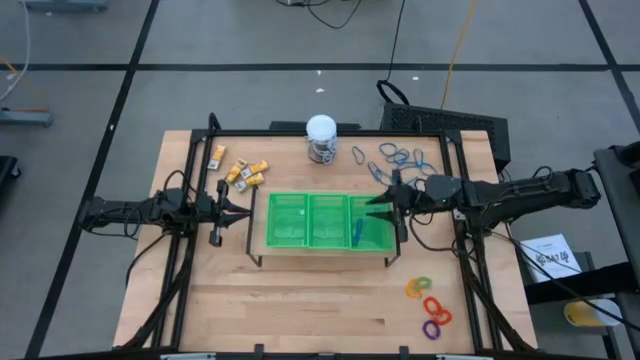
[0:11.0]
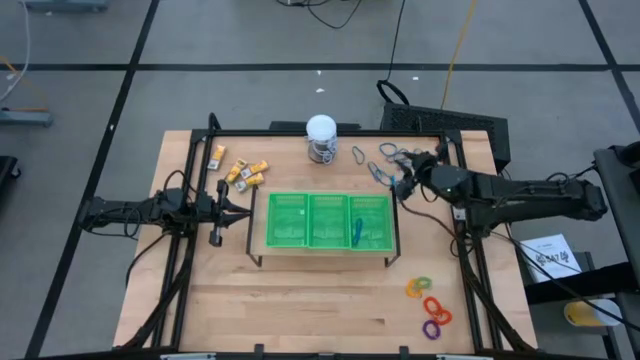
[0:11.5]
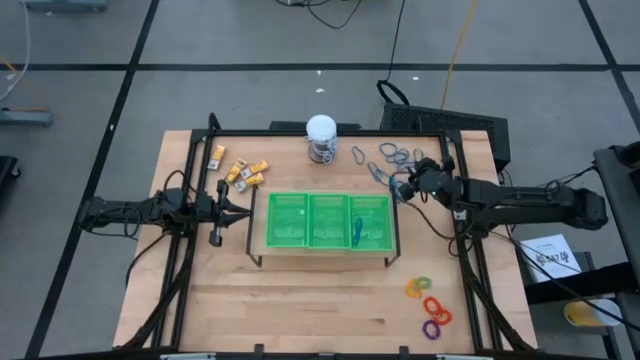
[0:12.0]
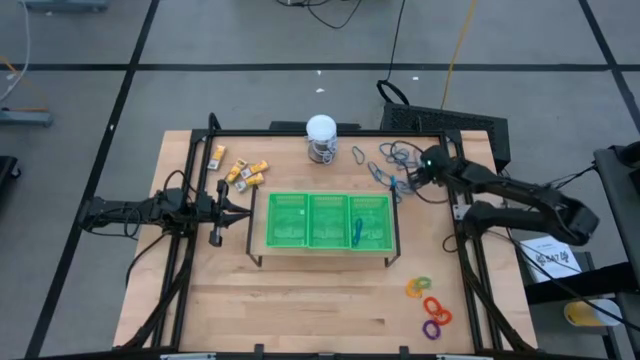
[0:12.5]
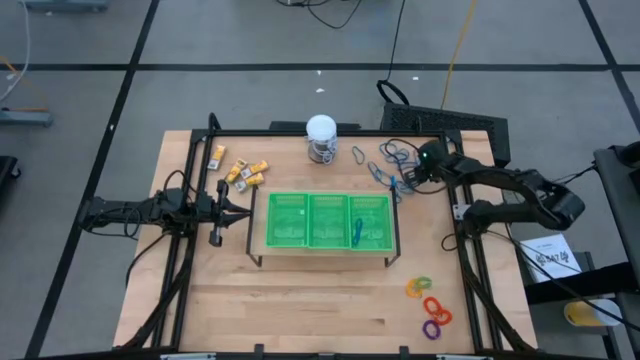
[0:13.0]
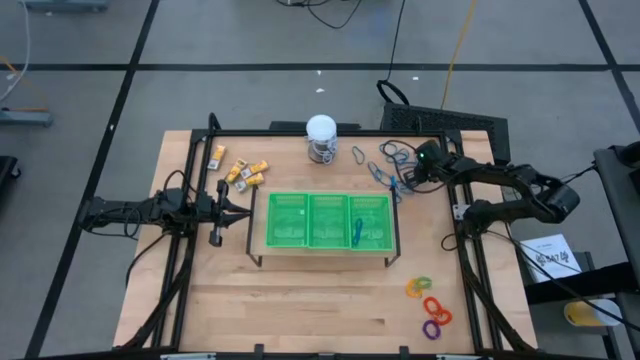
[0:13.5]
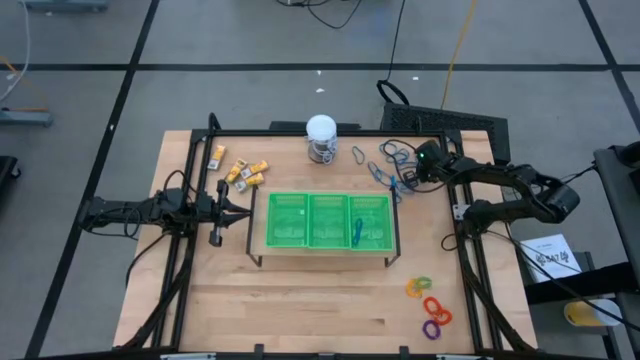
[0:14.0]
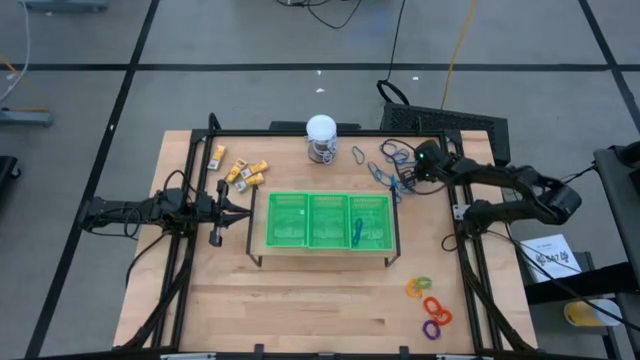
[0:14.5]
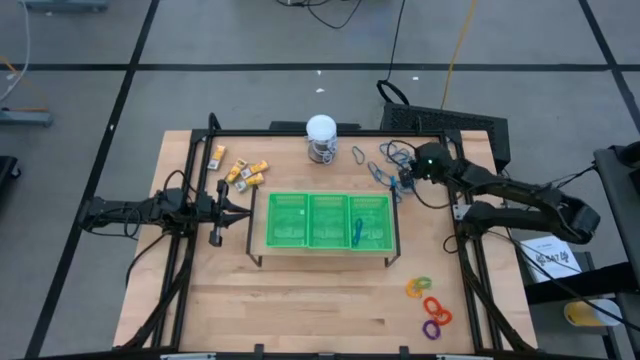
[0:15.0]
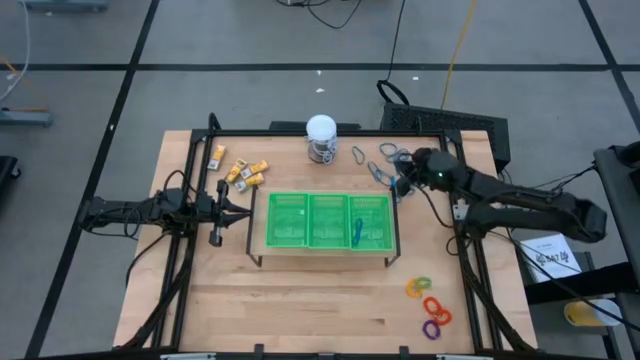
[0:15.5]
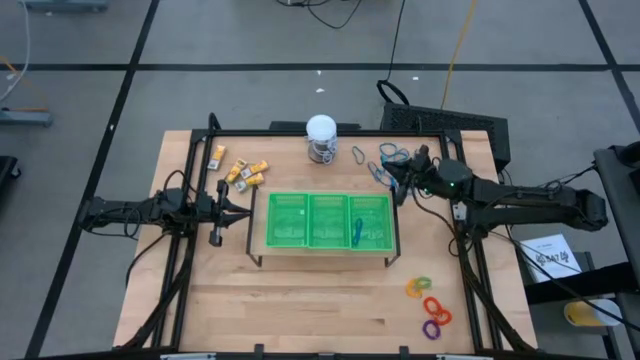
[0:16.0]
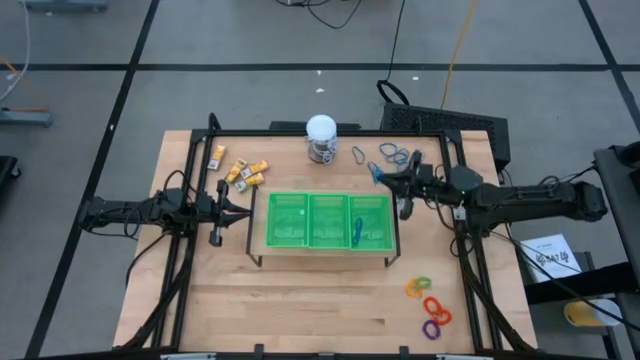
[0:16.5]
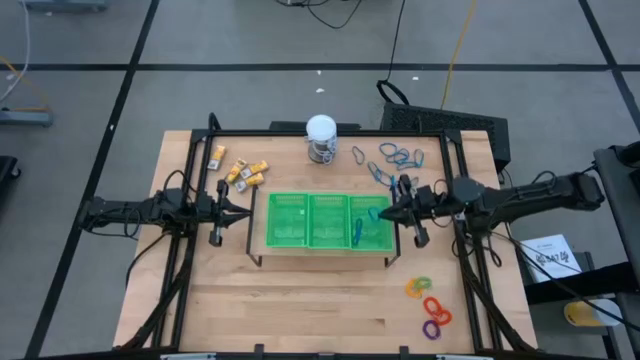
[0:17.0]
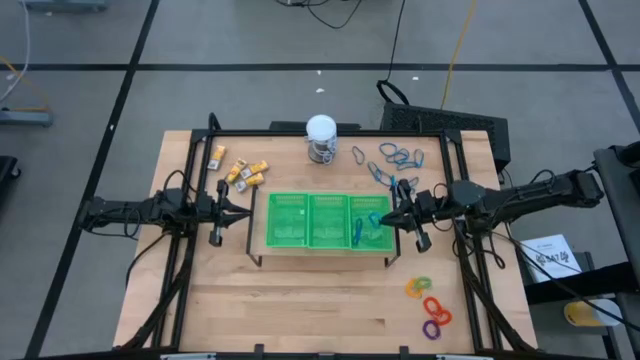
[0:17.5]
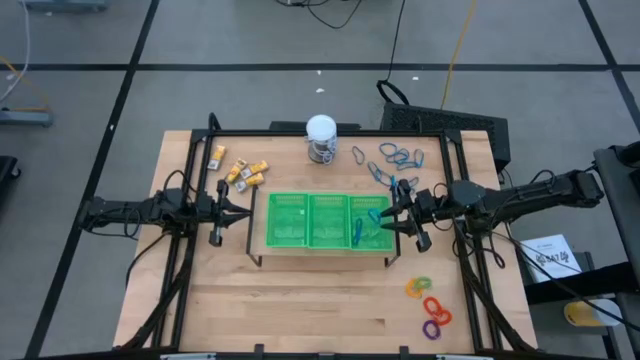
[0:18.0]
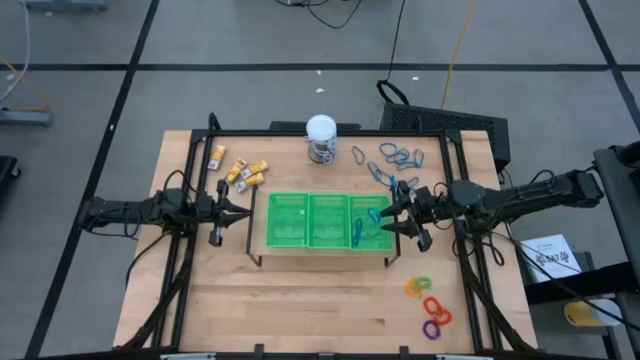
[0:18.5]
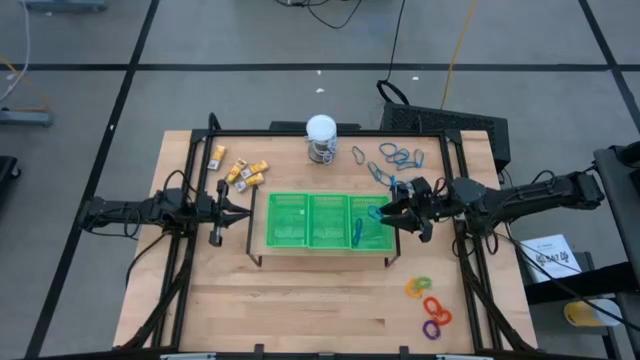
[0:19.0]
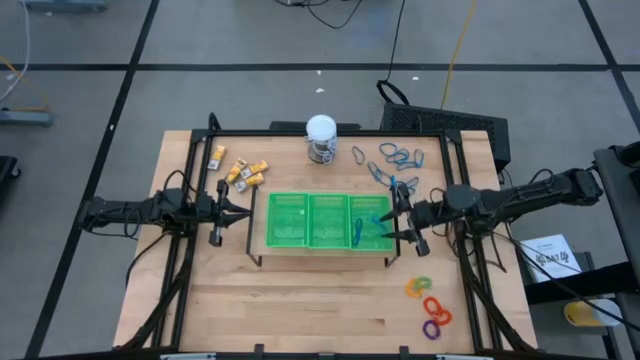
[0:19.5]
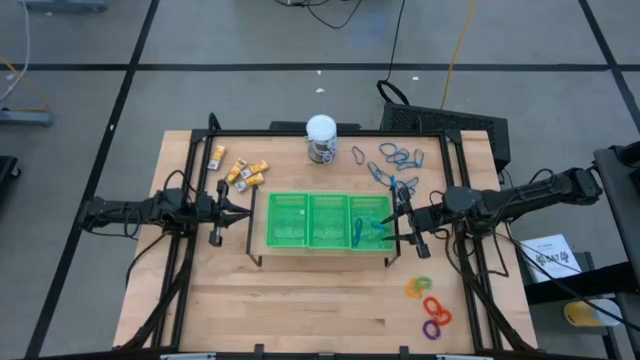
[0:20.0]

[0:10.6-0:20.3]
Task: Pick & Place Office Desk Supplies
Put the blue rubber band into the right green bin on the shelf

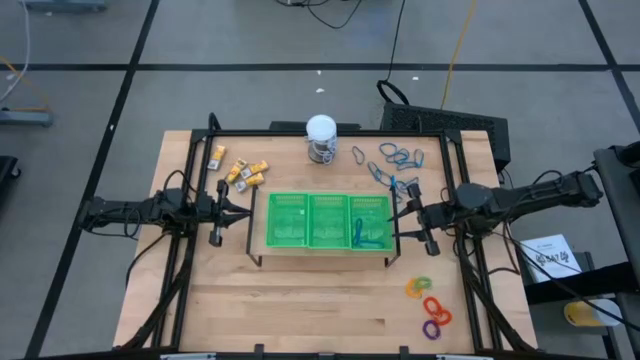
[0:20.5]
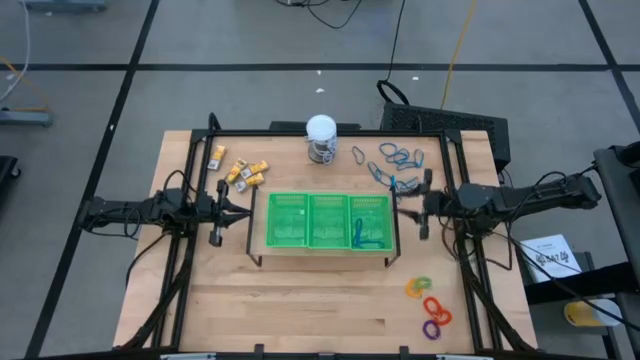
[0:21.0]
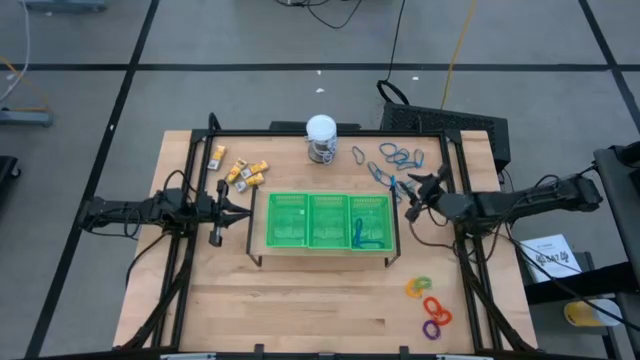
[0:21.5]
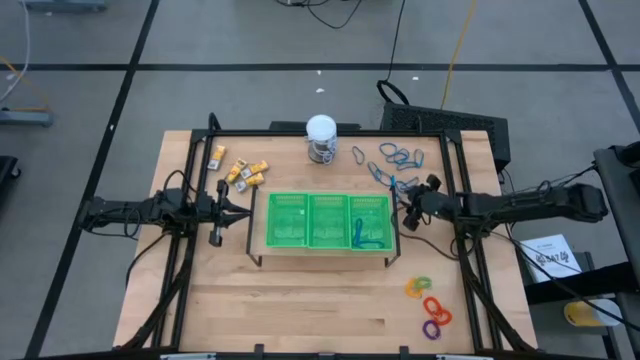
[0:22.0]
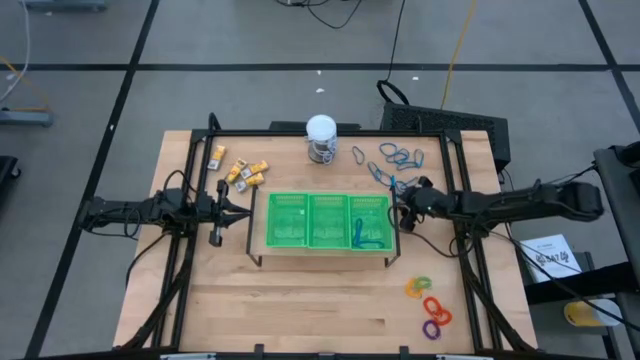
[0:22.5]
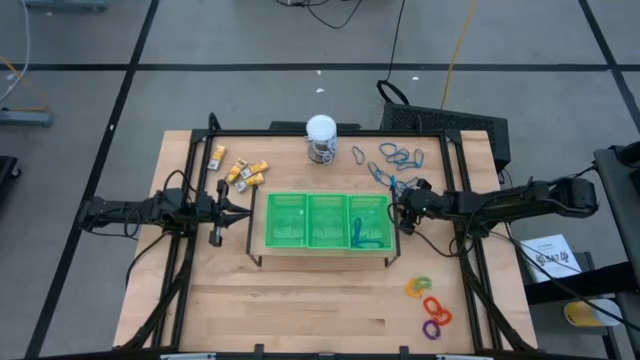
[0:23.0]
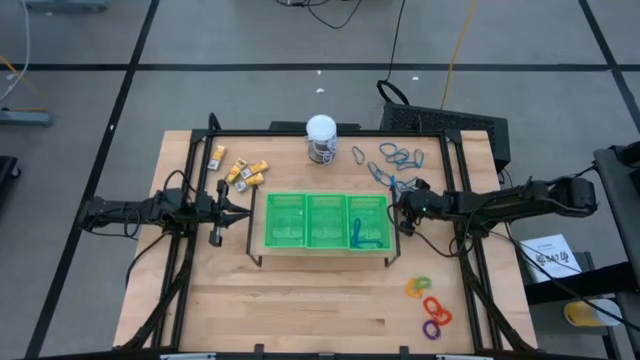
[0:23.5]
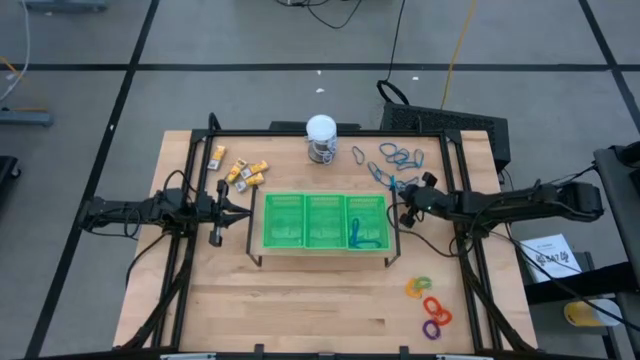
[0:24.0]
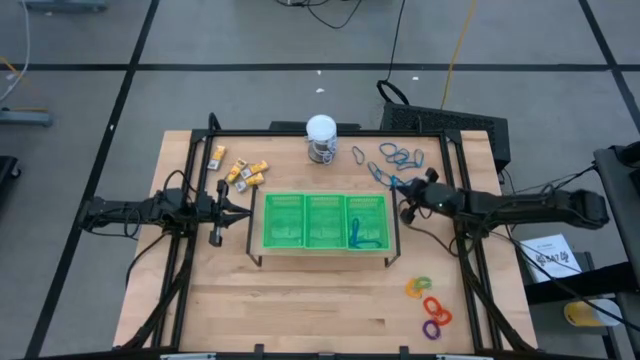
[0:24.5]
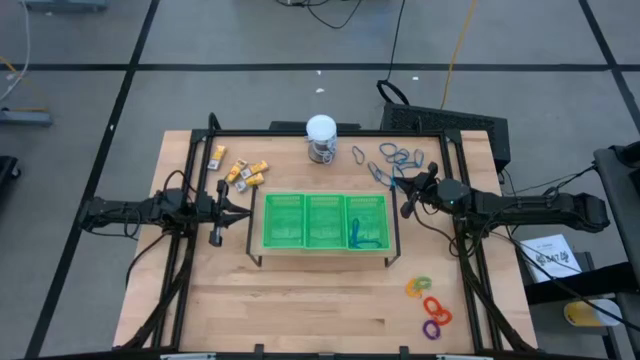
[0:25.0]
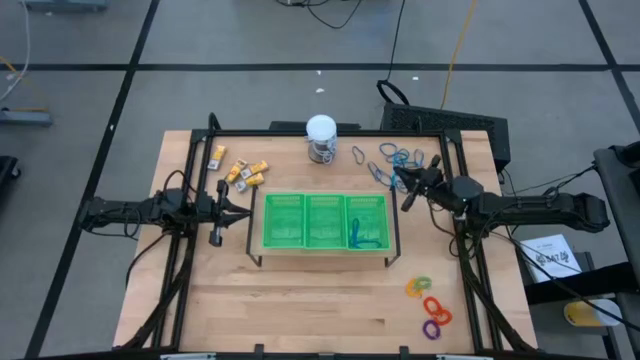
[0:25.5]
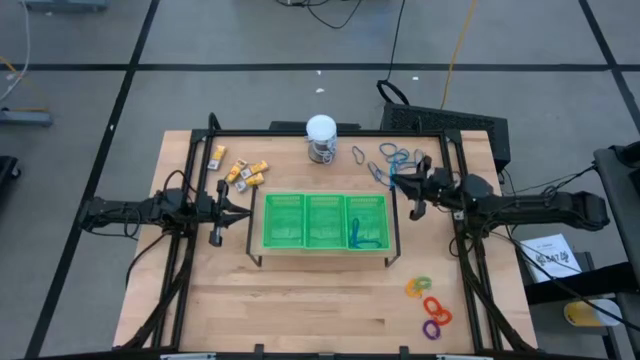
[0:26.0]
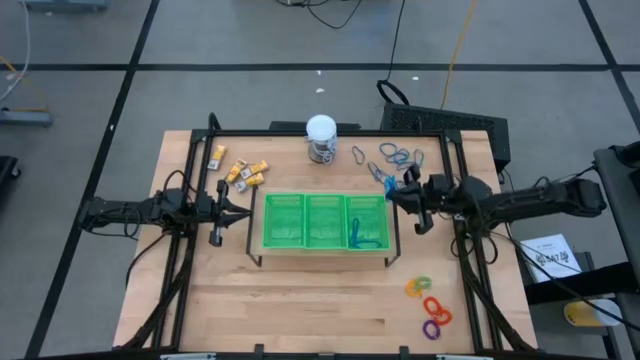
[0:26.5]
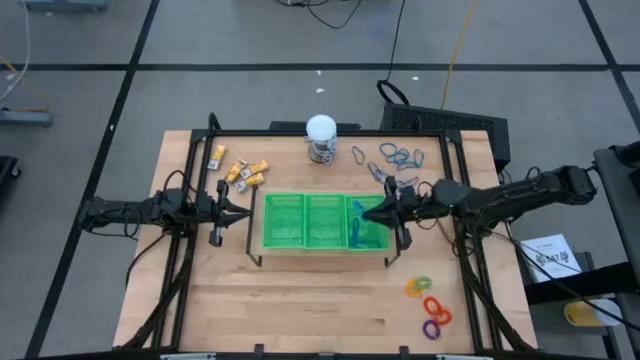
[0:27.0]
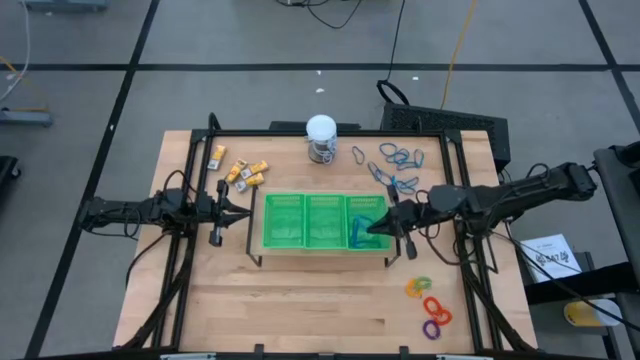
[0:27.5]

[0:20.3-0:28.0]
Put the blue rubber band into the right green bin on the shelf

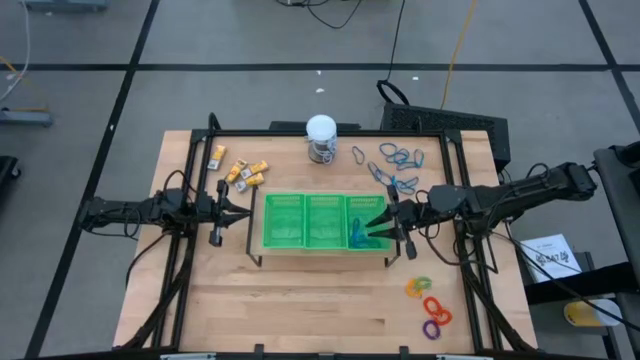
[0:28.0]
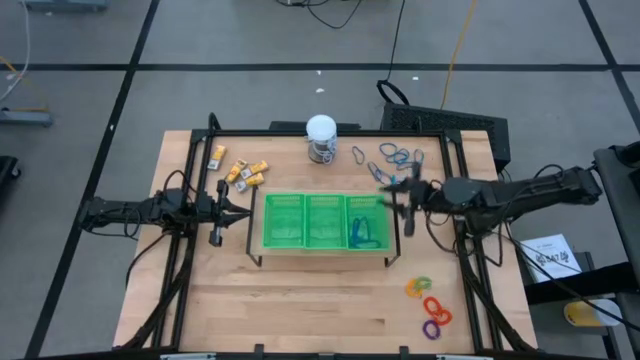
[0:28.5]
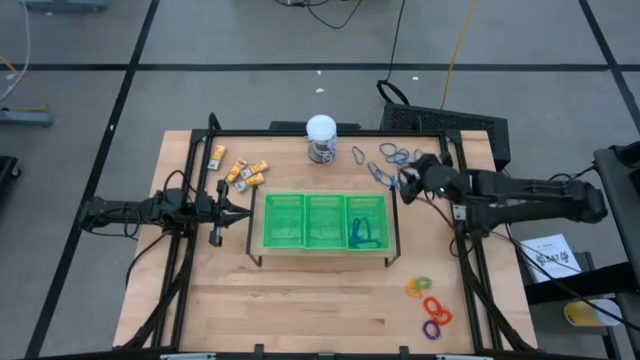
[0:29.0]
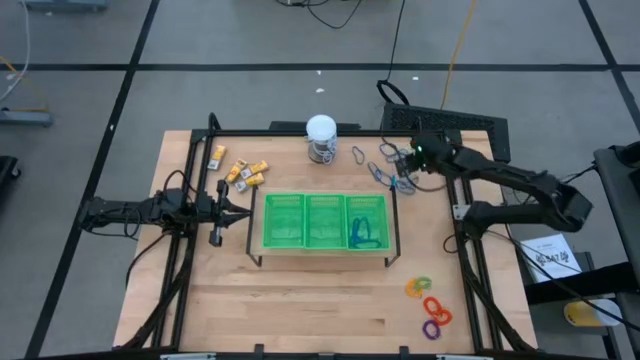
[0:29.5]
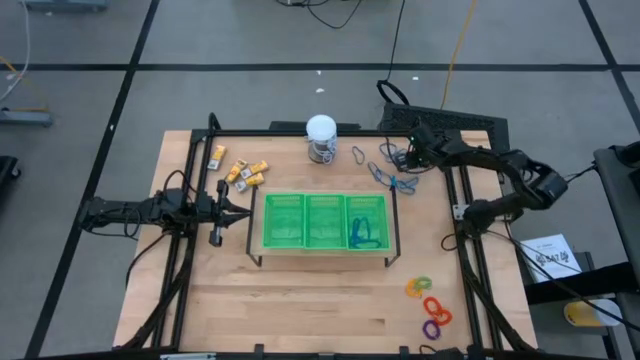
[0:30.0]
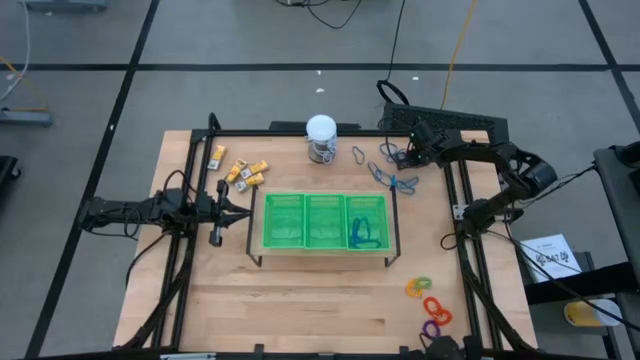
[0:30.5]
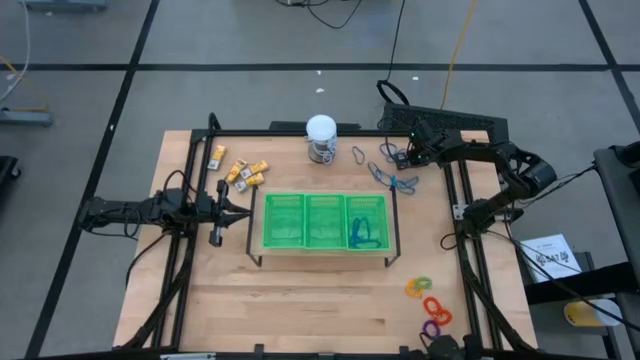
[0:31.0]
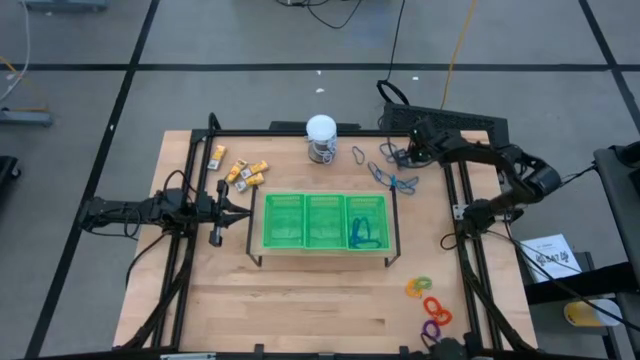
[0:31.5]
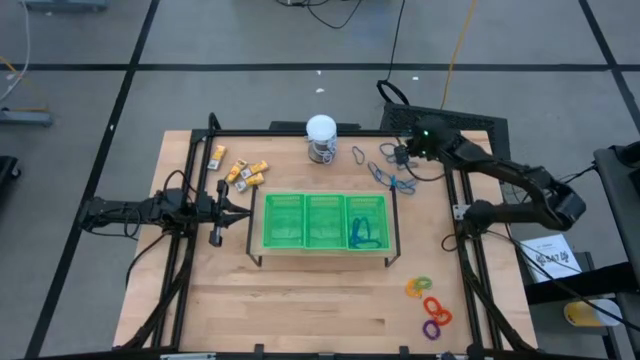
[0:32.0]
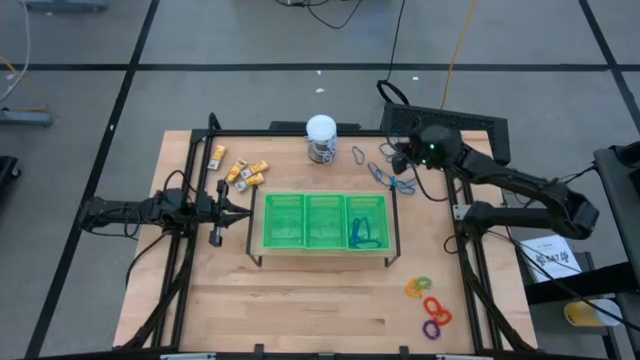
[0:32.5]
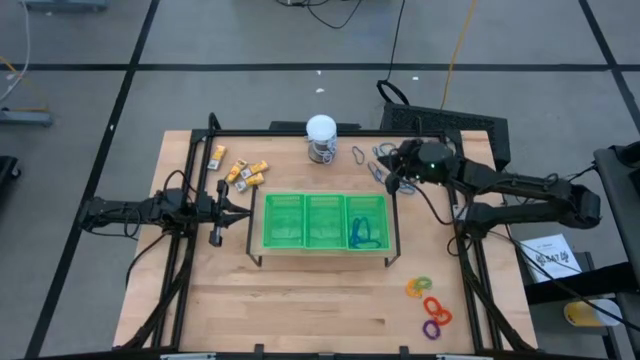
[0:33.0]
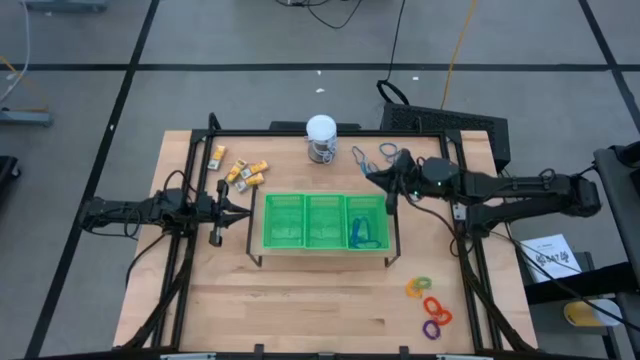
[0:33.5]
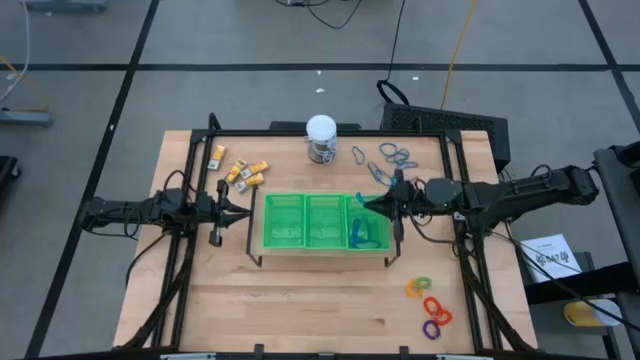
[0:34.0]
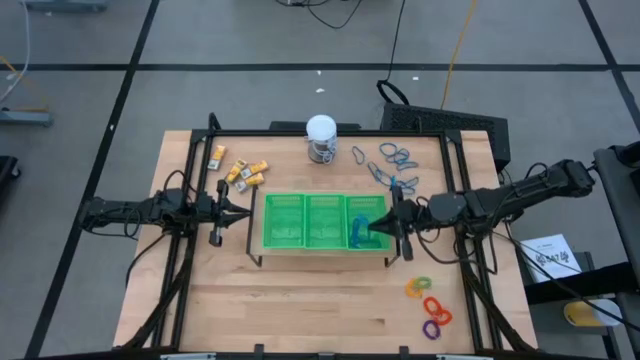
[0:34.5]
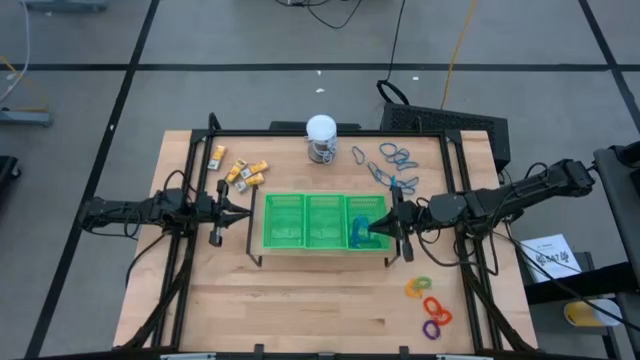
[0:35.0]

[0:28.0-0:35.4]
Put the blue rubber band into the right green bin on the shelf
